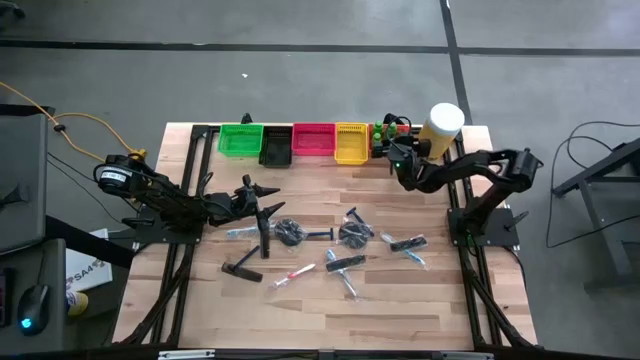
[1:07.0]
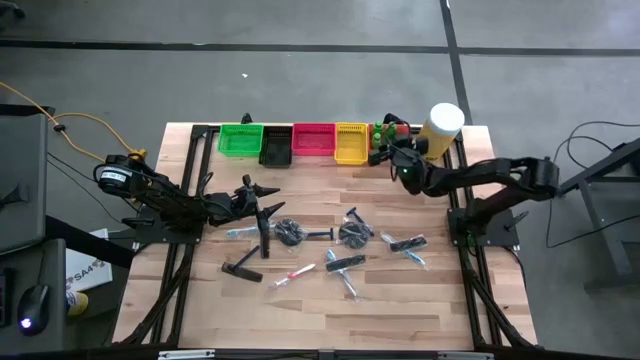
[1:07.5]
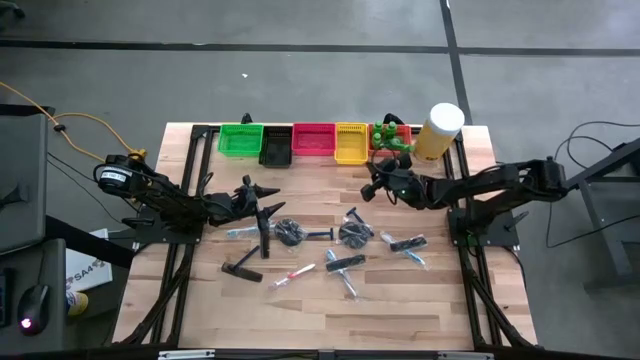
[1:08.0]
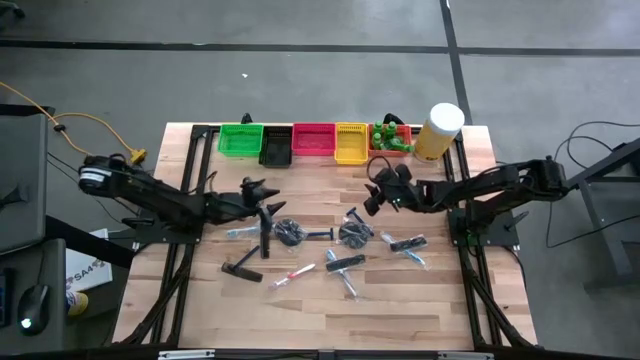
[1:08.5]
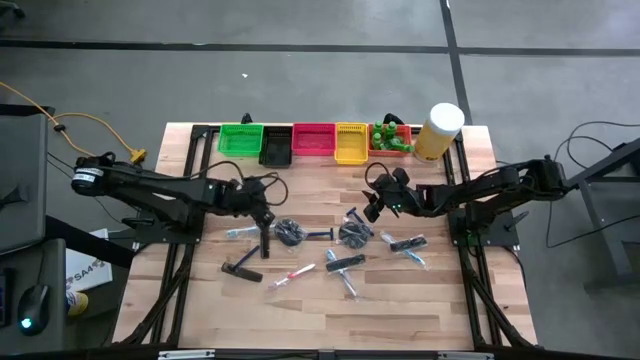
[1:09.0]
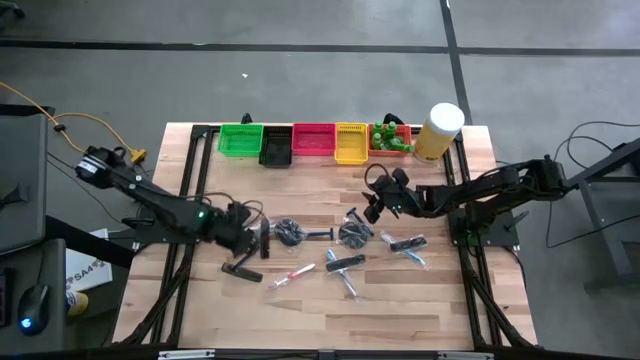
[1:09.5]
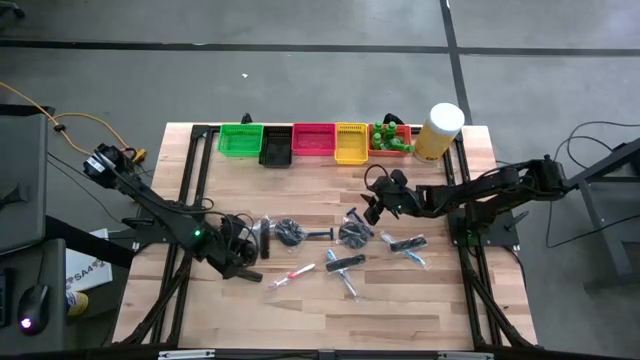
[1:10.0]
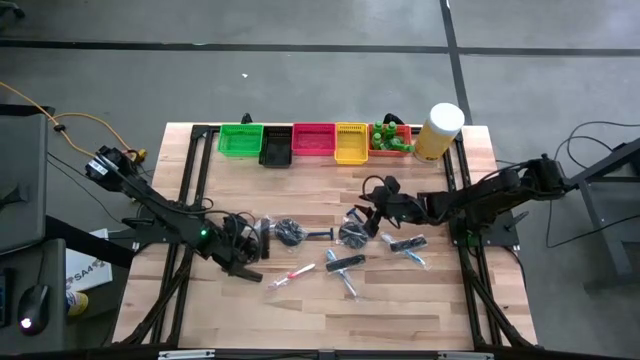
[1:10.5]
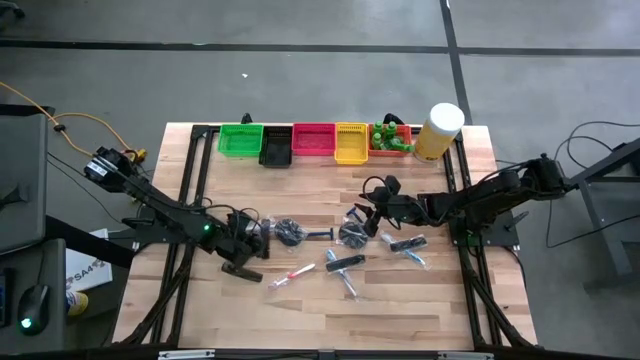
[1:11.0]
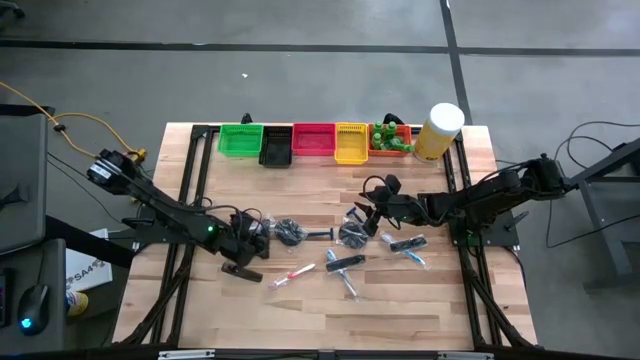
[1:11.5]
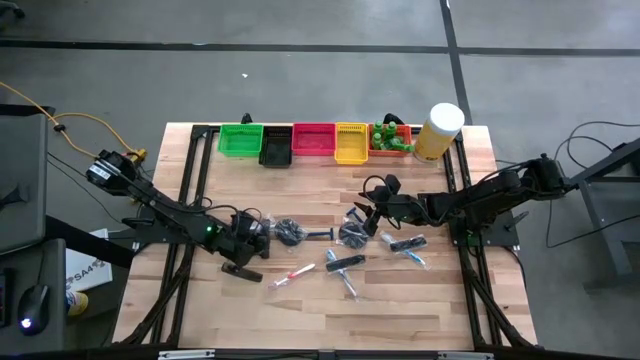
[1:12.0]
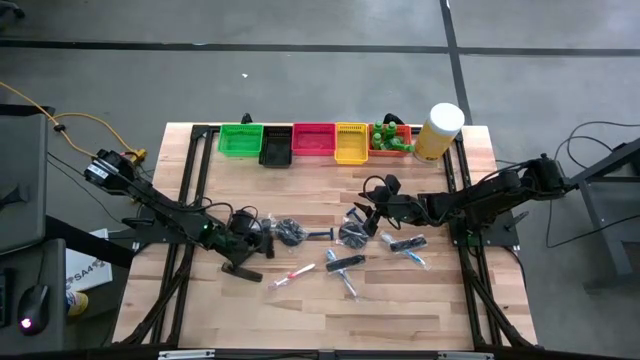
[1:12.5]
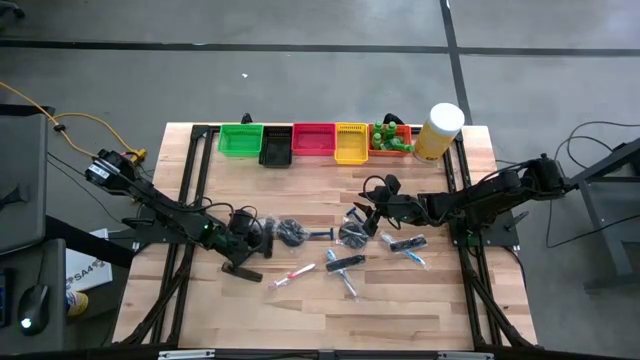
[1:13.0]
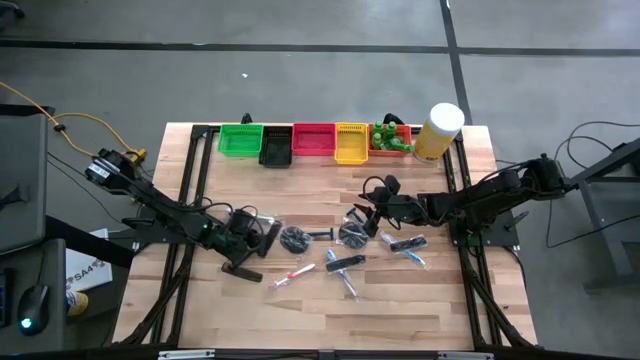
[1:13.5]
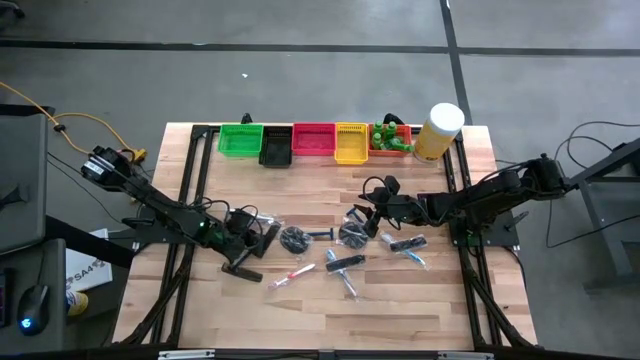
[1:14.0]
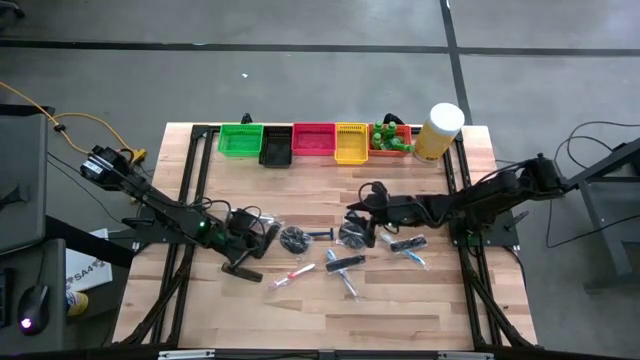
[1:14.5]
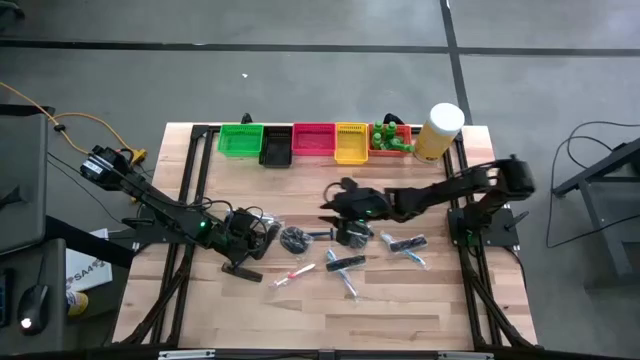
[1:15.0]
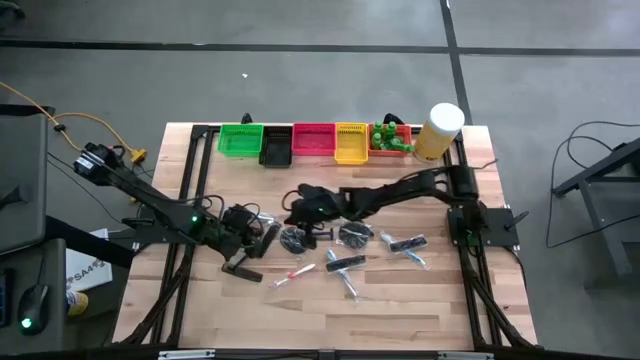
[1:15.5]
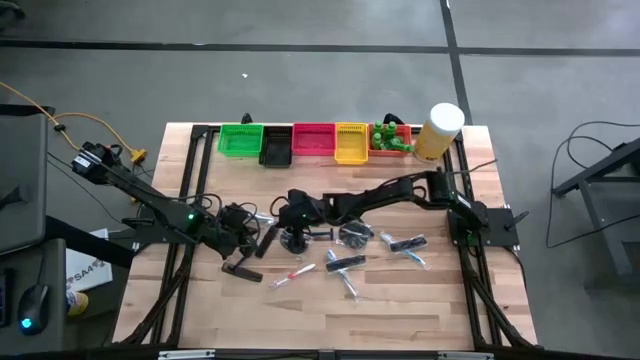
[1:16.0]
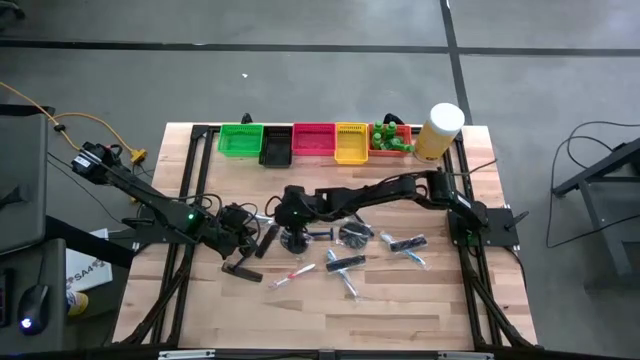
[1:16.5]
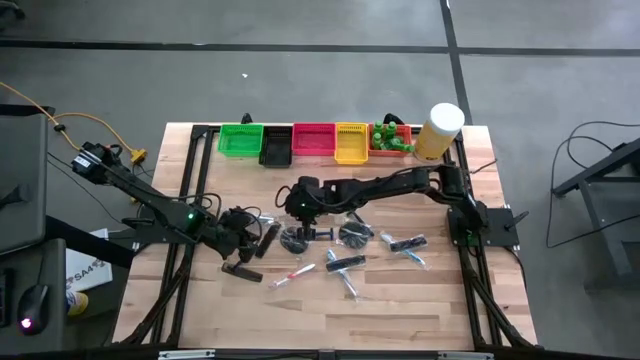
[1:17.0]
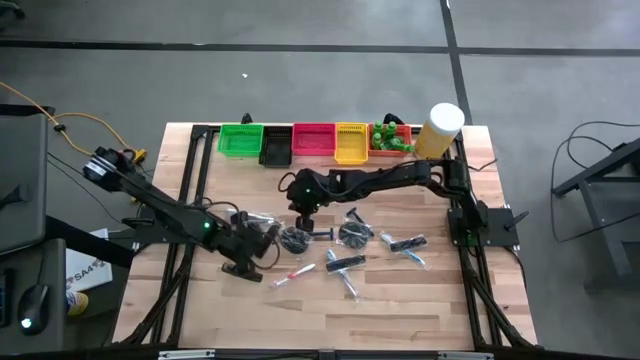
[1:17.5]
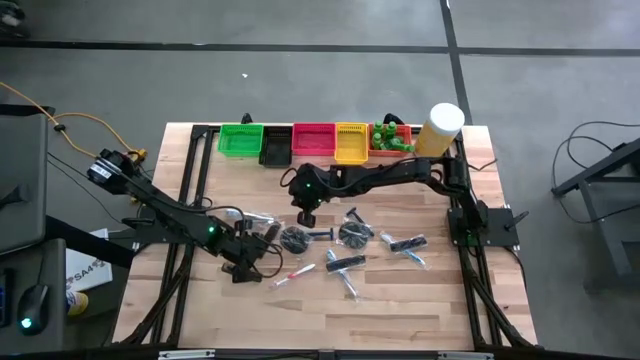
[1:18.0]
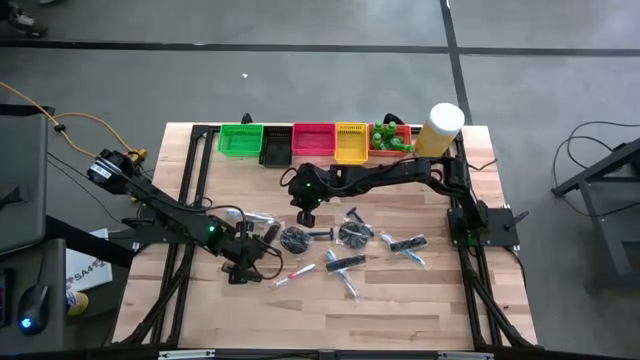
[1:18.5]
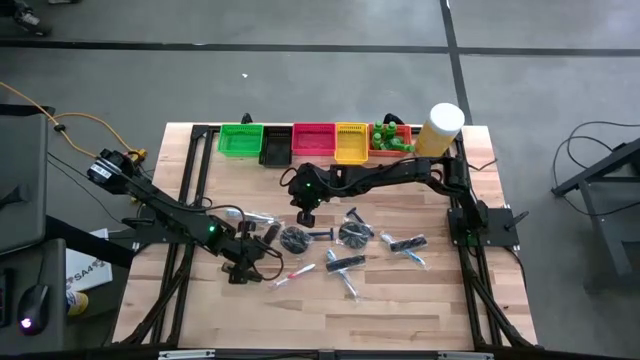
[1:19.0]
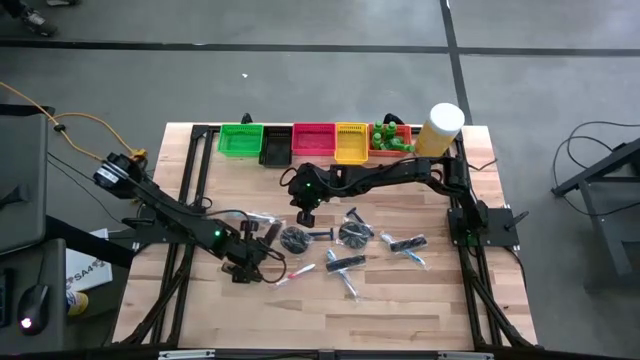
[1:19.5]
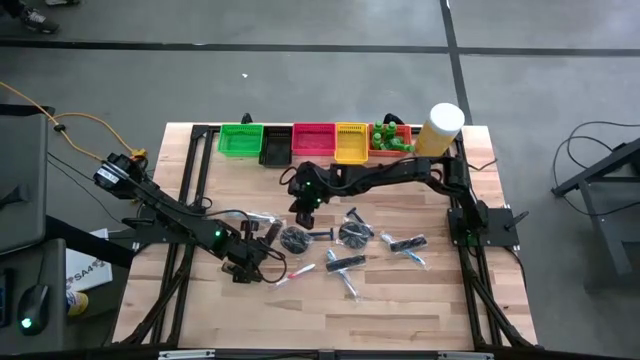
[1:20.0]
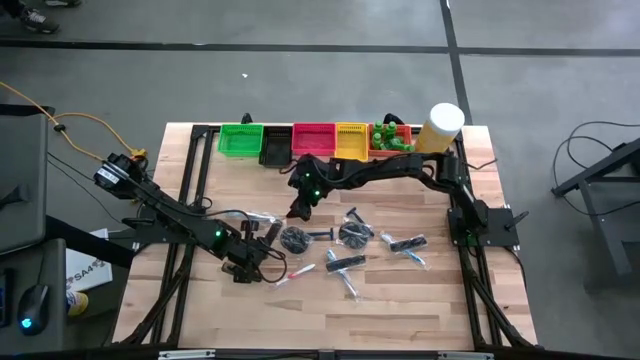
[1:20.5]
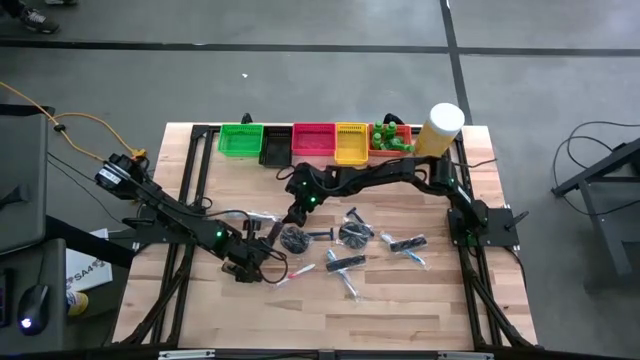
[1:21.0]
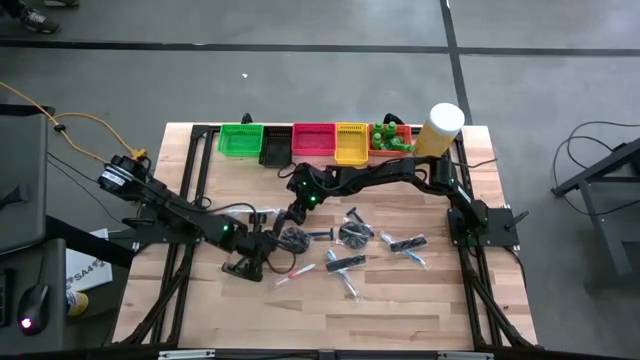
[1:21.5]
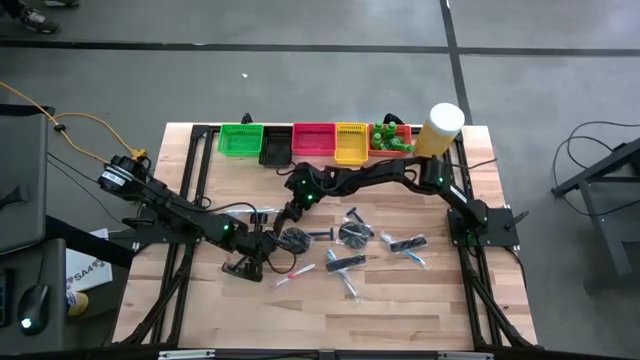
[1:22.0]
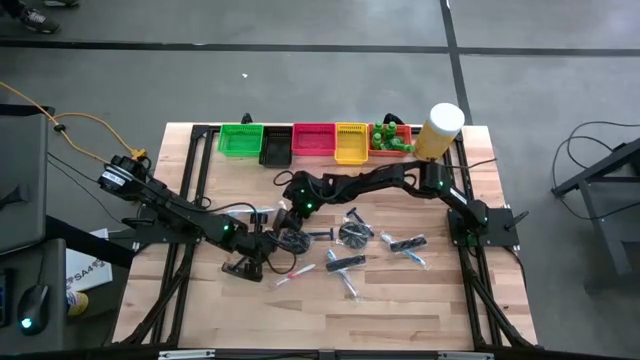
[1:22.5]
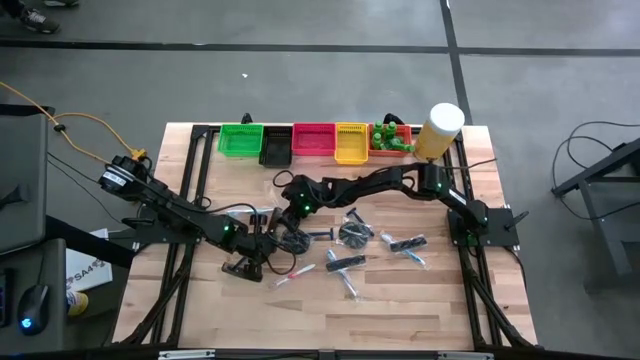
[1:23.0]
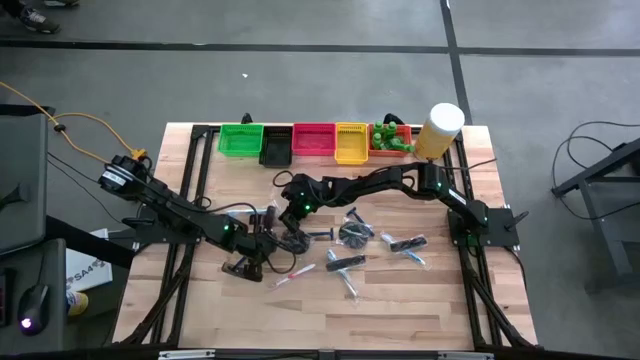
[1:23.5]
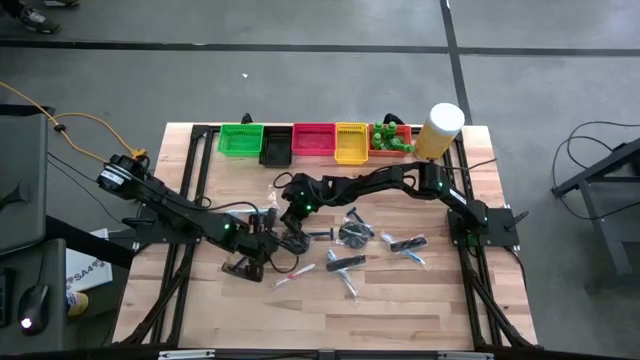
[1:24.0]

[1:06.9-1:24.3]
Task: Pick & Place Travel size toiletries
Put the black hair comb into the yellow basket

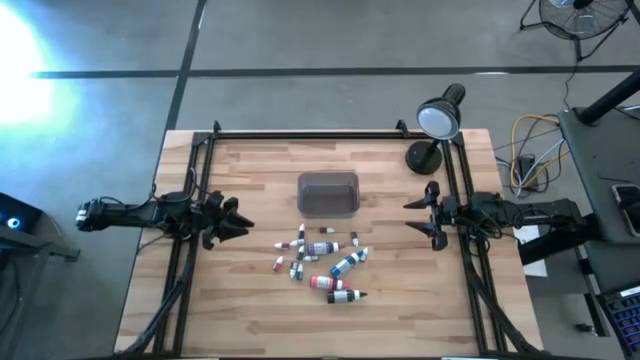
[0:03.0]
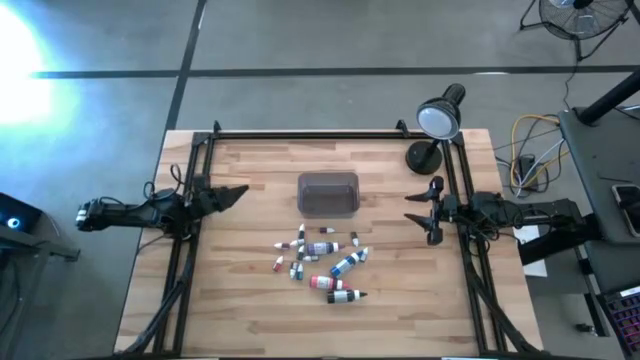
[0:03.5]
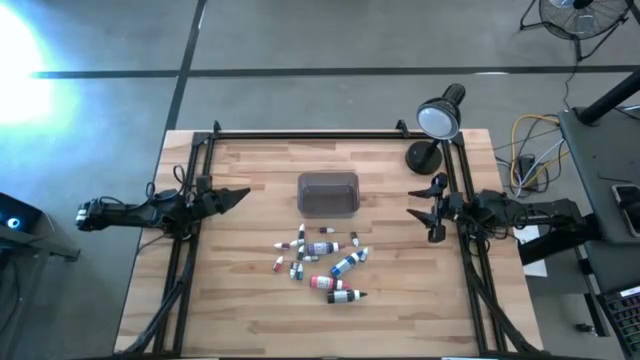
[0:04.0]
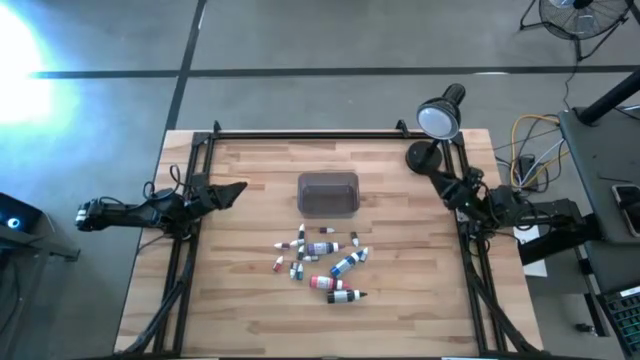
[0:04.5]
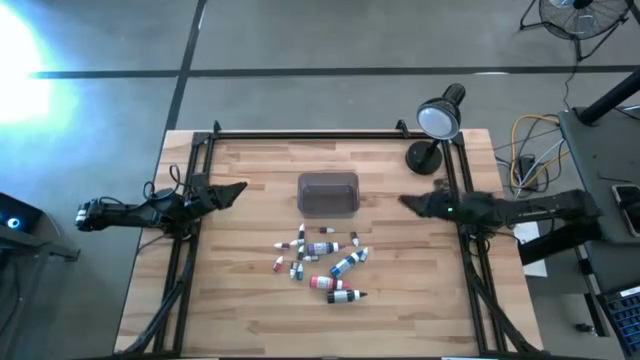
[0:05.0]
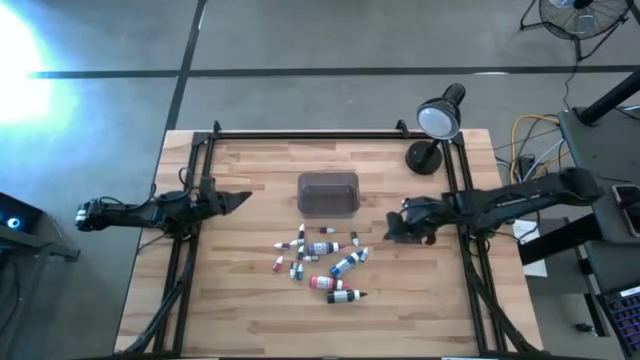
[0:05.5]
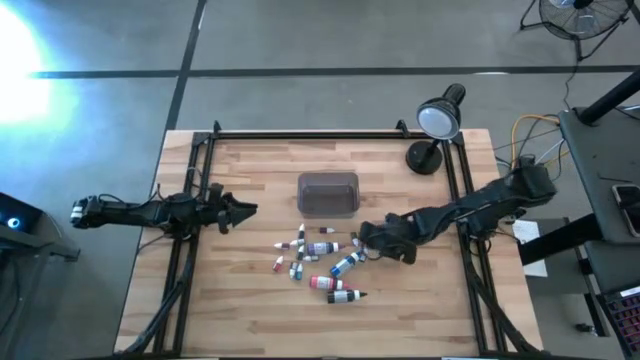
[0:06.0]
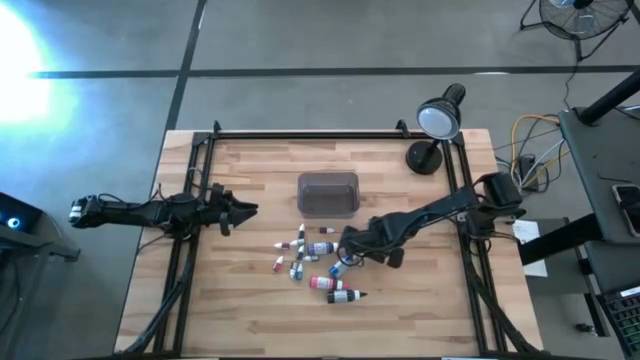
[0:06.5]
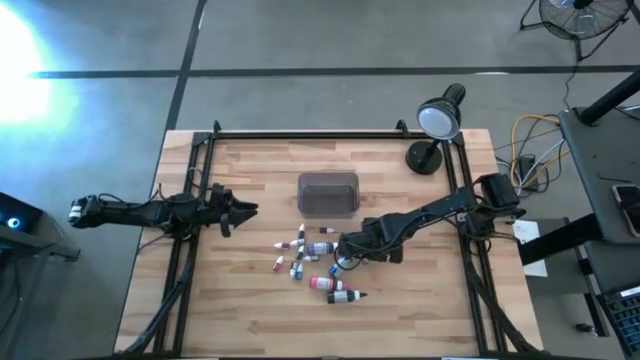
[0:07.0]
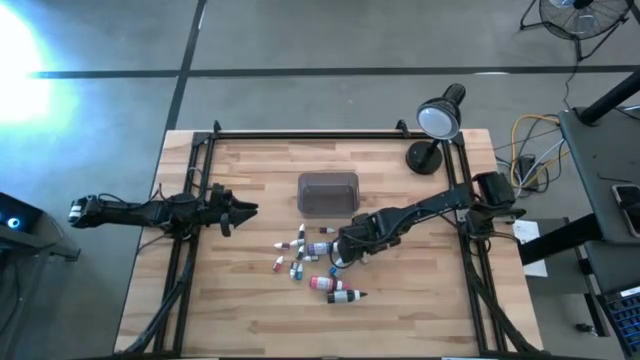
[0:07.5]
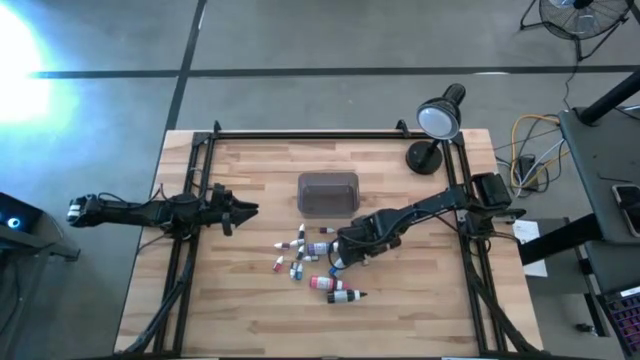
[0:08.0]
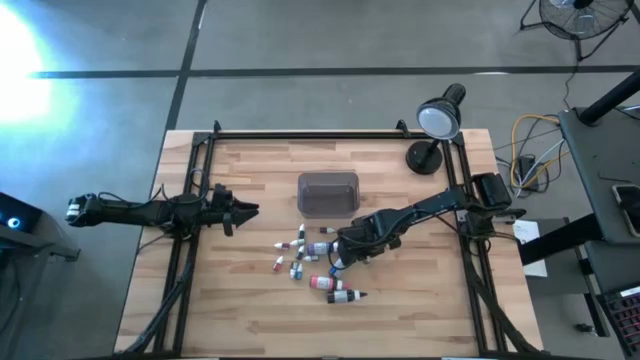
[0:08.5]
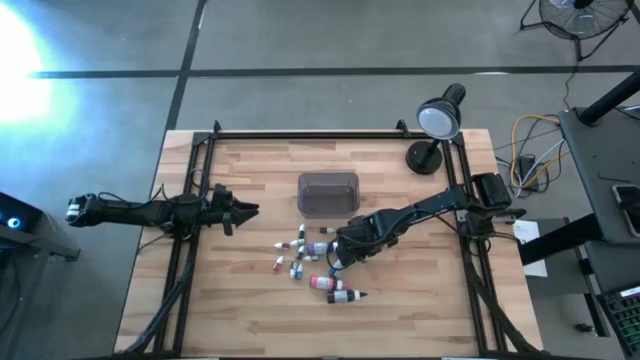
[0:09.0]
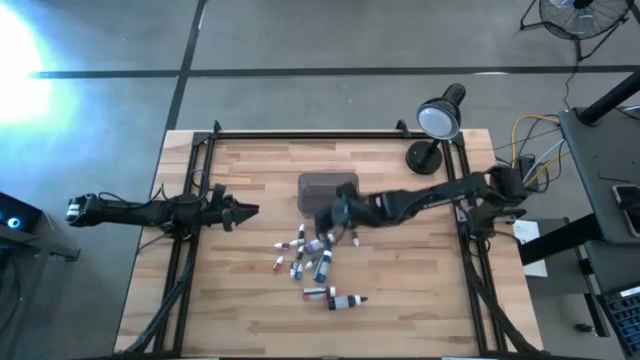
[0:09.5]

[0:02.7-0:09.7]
Task: Pick & Place food coloring
Put the small green food coloring bottle into the bin
